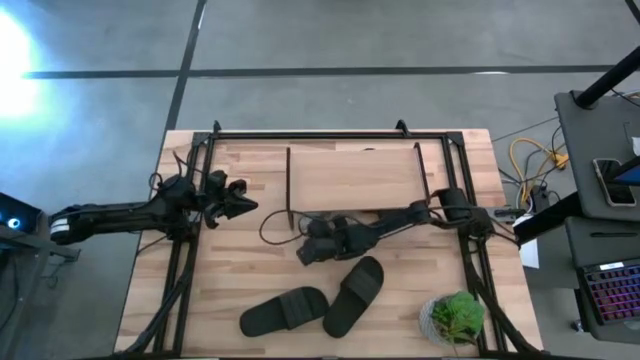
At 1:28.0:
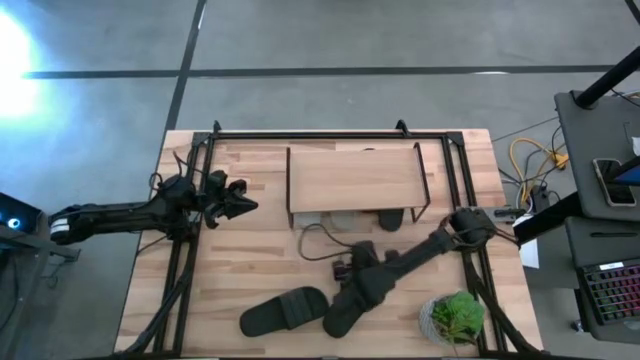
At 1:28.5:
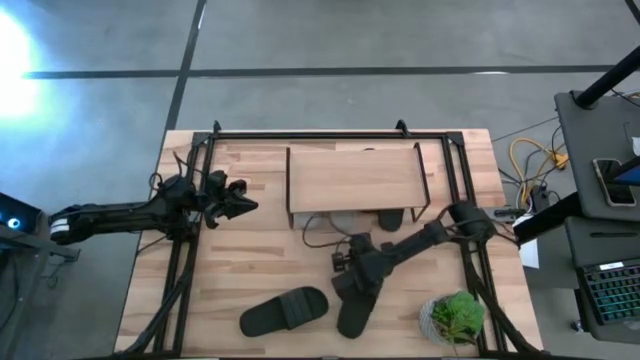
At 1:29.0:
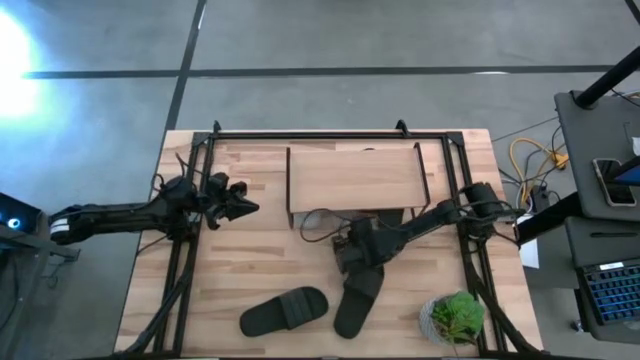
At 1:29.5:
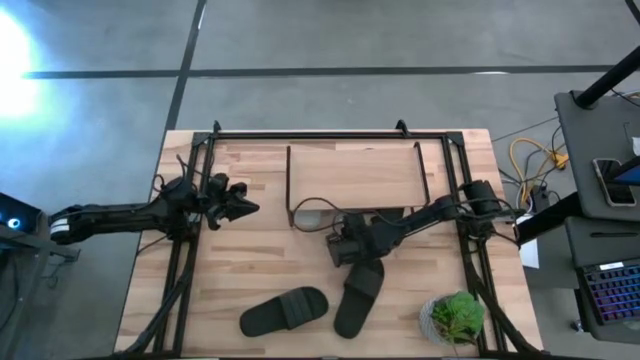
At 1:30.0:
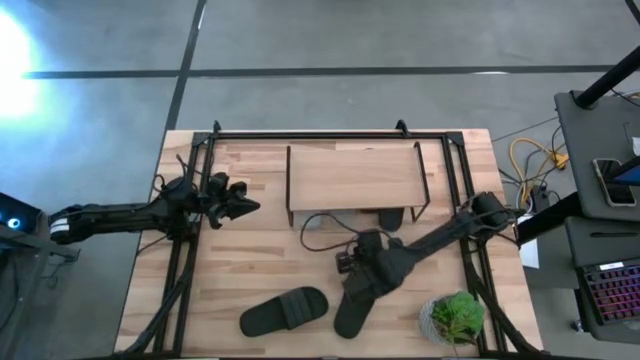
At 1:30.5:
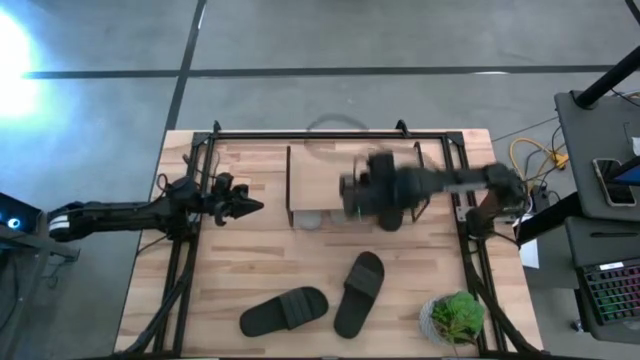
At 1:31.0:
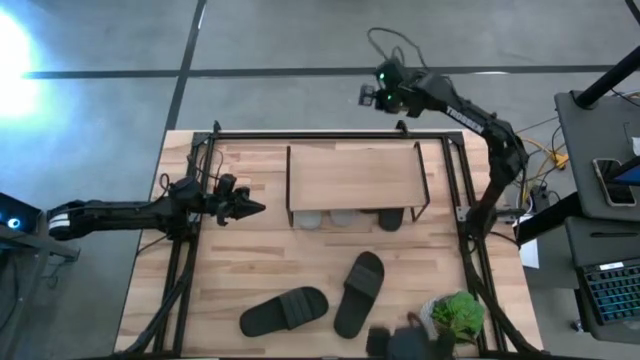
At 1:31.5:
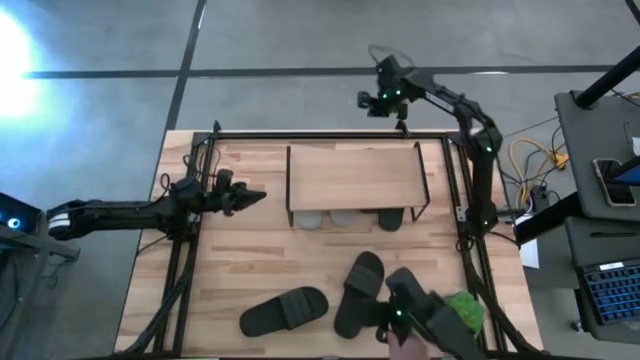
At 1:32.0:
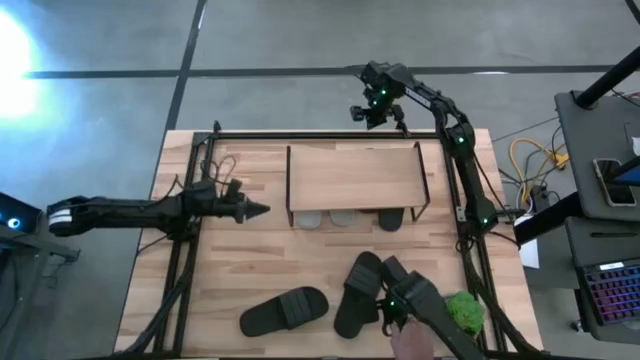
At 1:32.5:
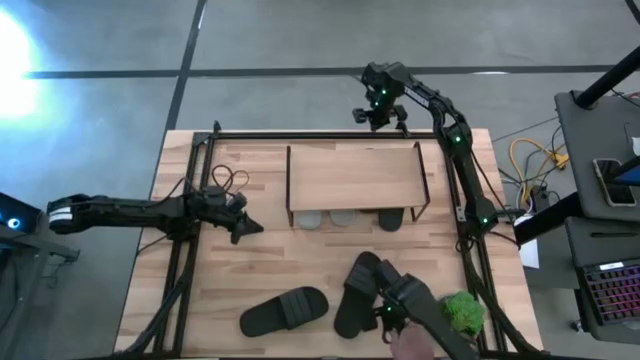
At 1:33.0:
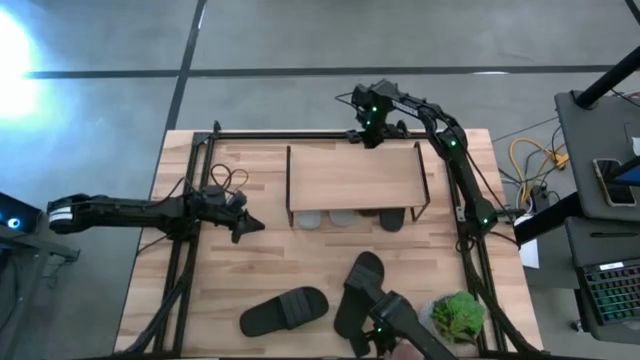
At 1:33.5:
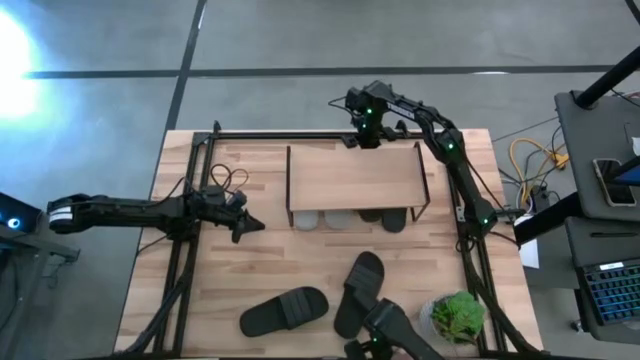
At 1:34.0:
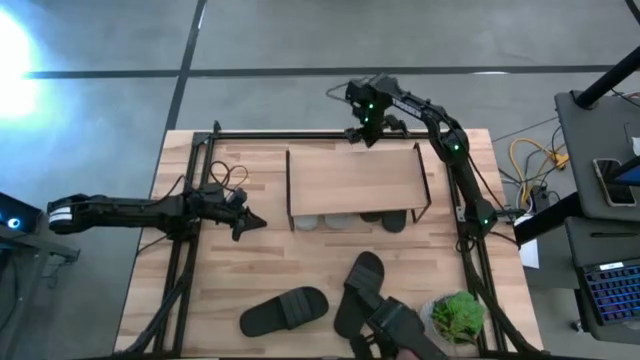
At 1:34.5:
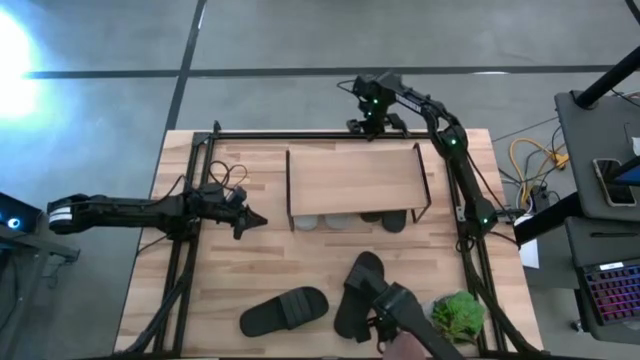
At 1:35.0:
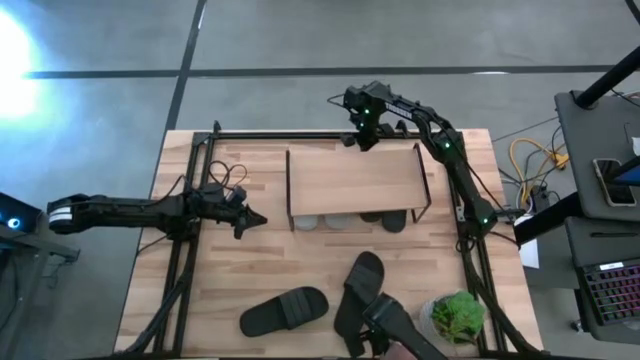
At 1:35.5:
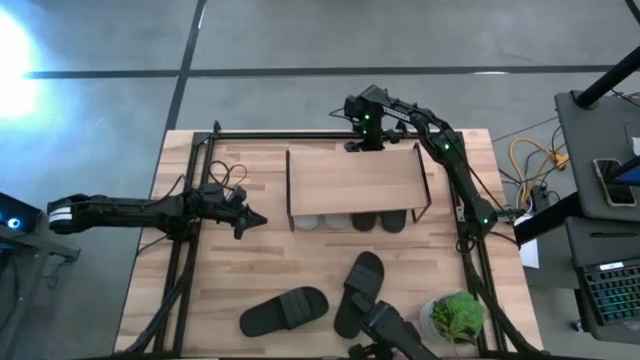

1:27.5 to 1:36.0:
Task: Pick and place slides into the shelf
Adjust the slippers under the shelf

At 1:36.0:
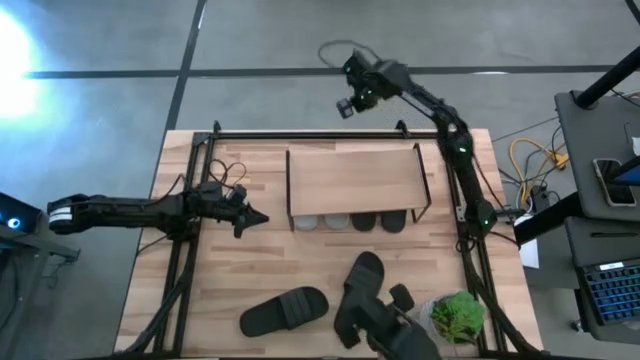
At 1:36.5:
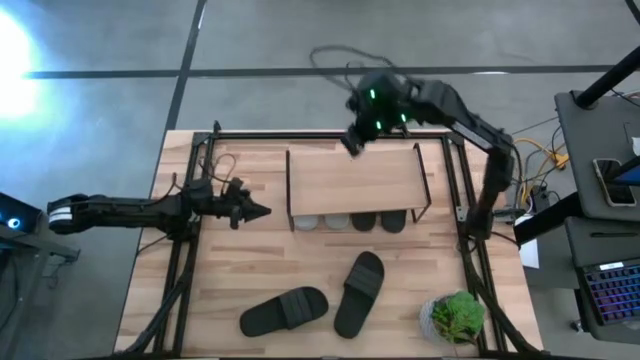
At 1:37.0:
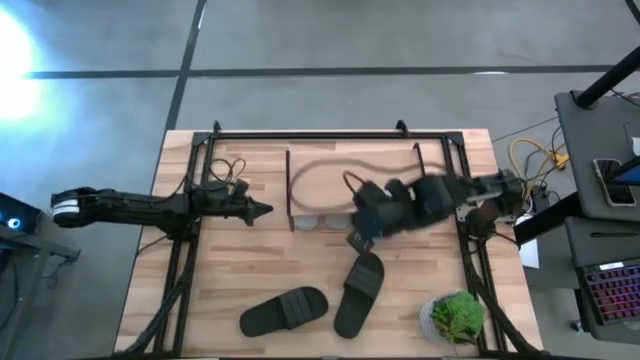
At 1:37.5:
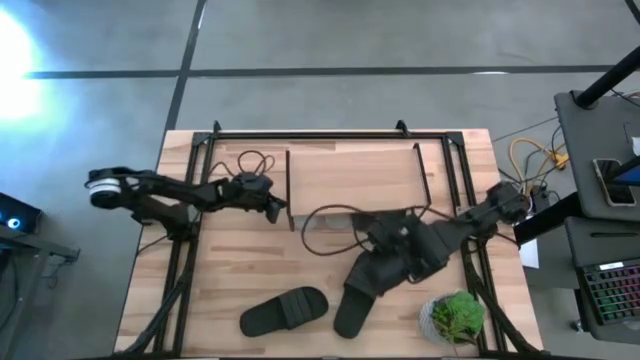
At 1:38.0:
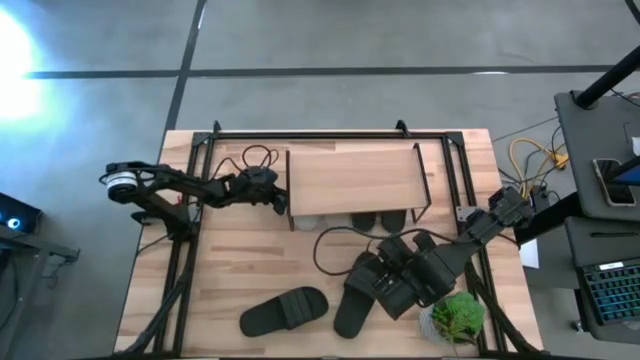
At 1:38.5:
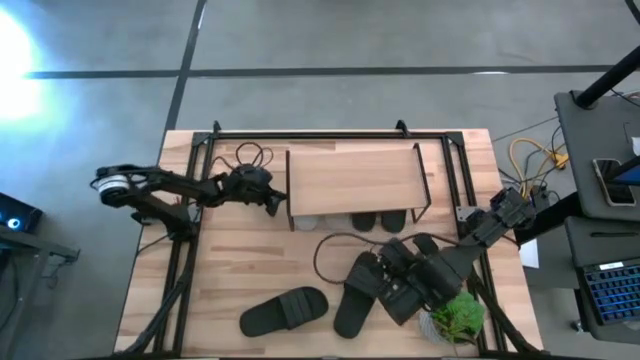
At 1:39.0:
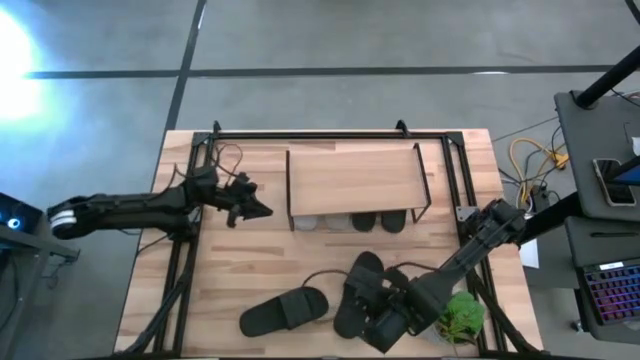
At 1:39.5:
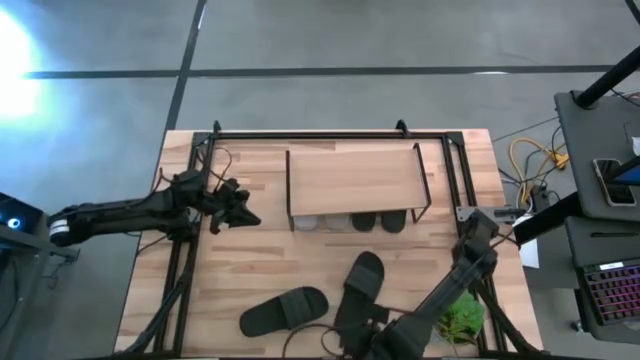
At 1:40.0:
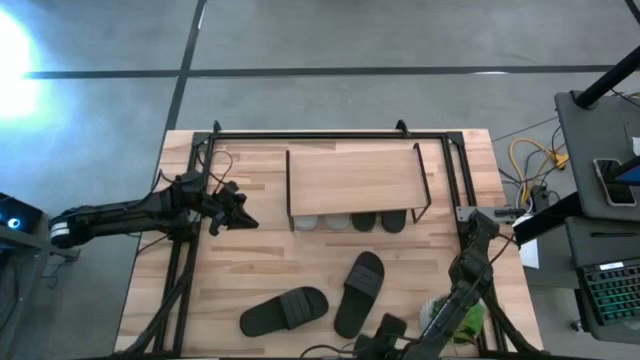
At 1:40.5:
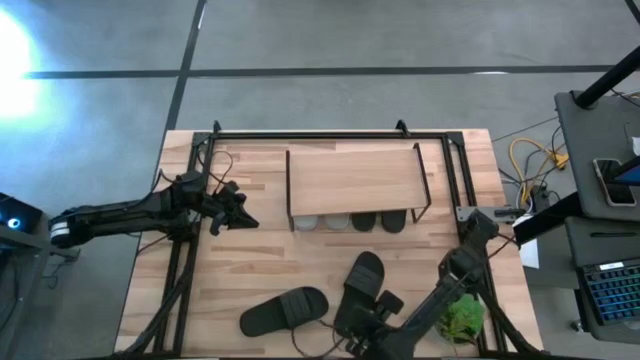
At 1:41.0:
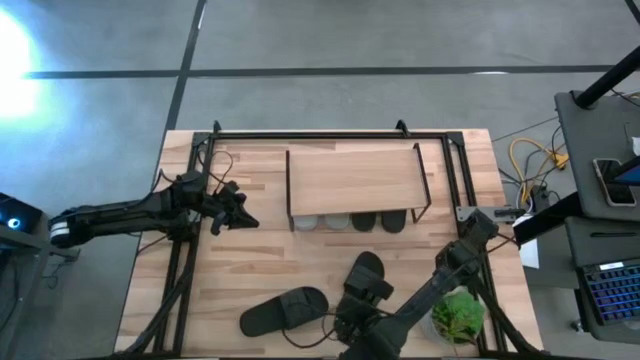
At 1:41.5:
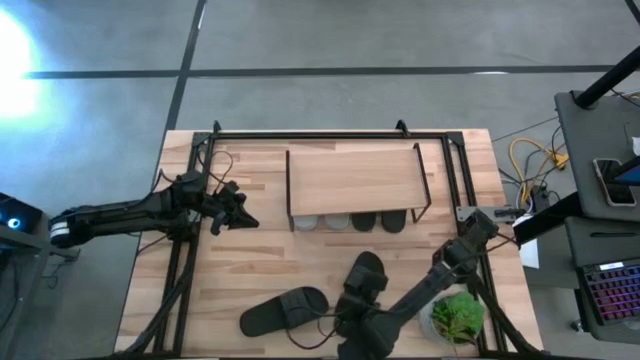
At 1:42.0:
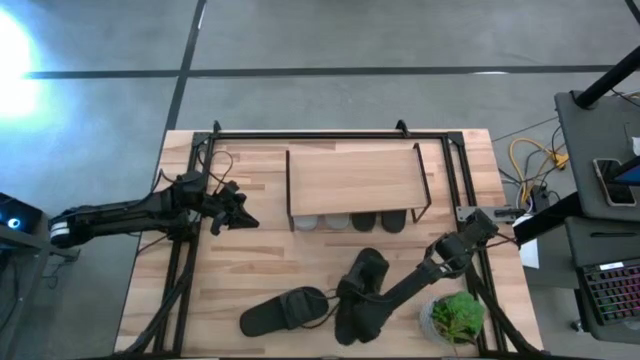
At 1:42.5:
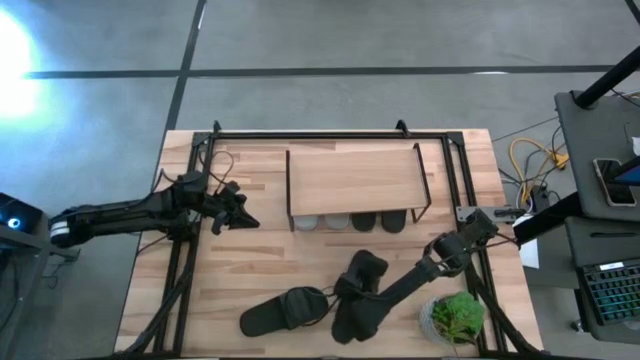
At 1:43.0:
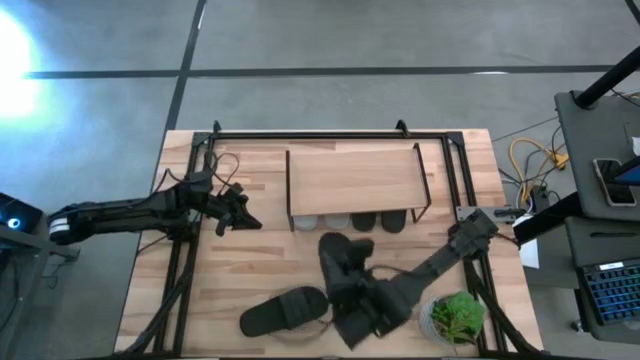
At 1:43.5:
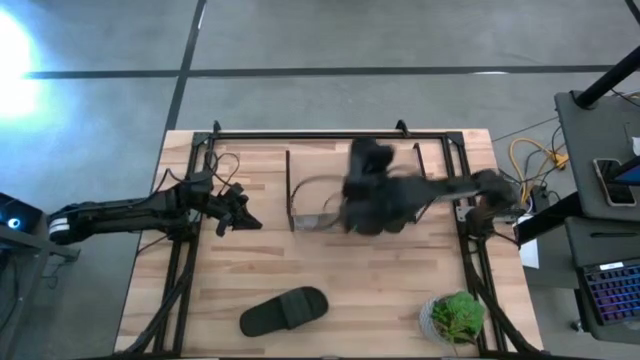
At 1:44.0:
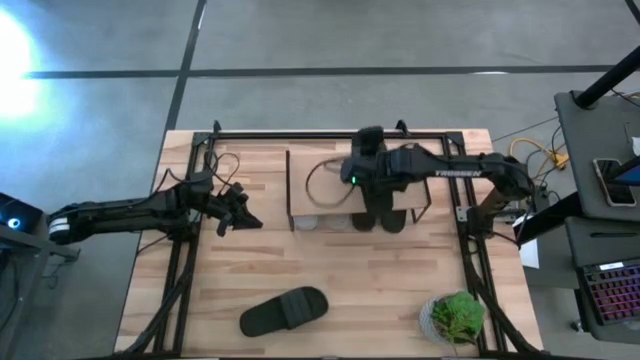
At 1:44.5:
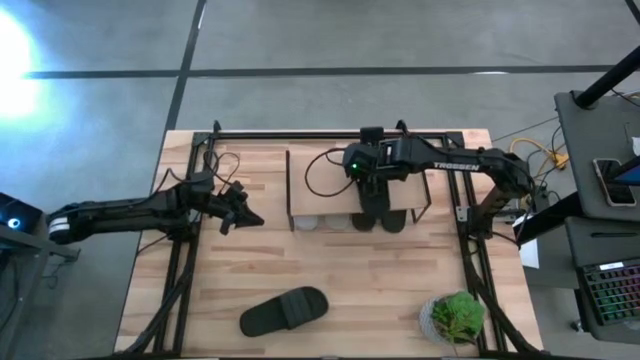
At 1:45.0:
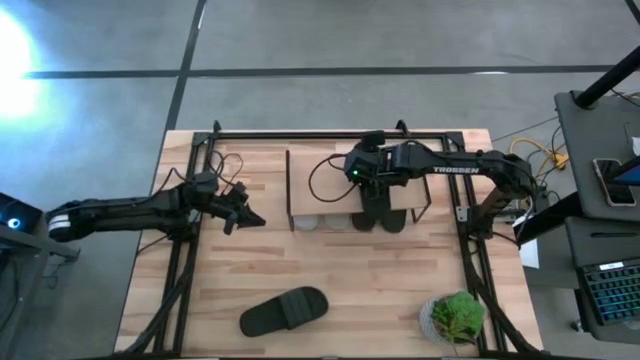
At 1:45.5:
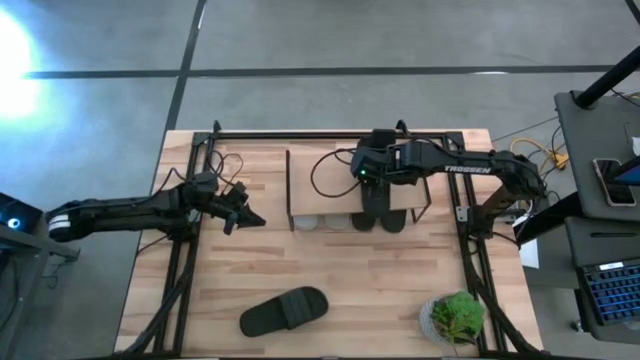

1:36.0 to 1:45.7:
Put the black slipper on the shelf

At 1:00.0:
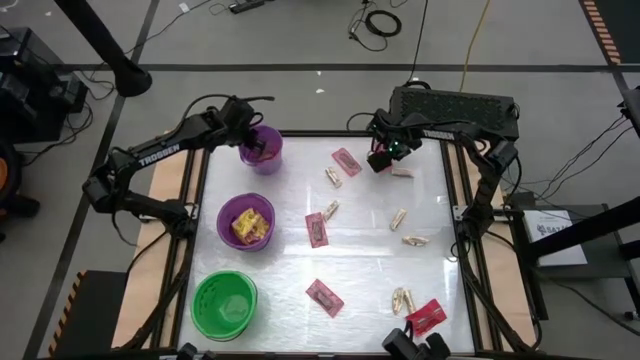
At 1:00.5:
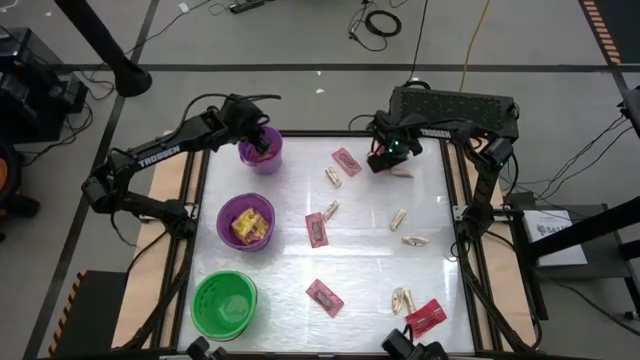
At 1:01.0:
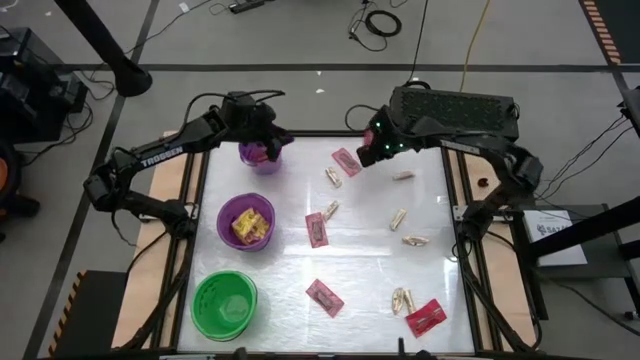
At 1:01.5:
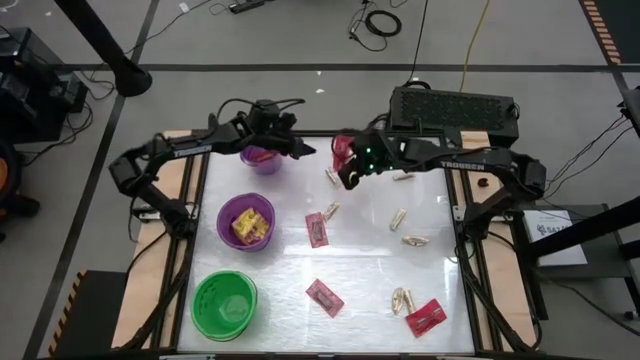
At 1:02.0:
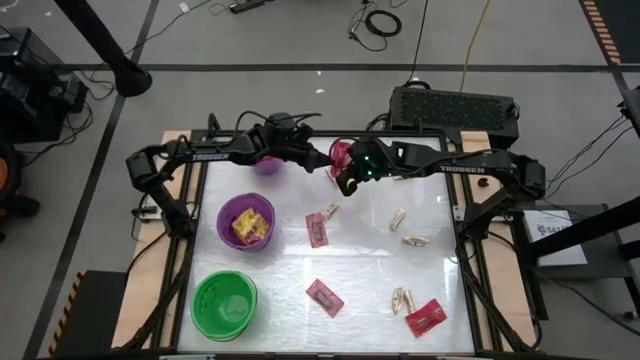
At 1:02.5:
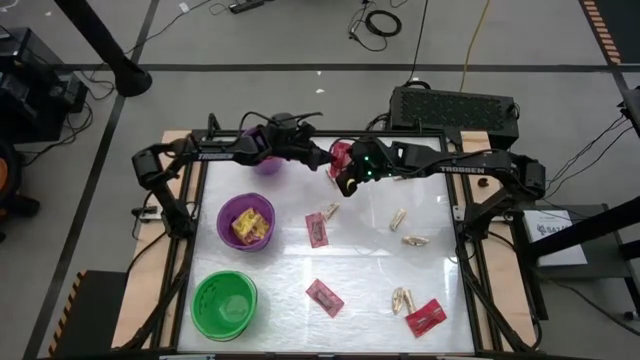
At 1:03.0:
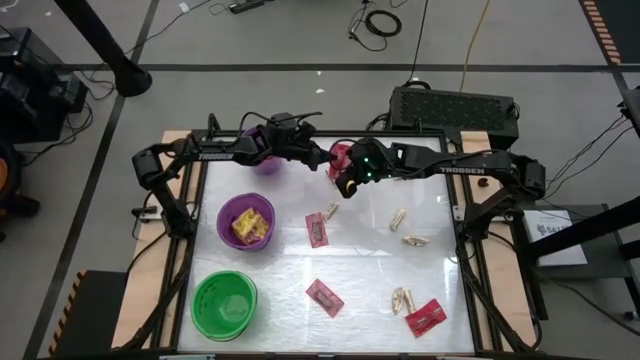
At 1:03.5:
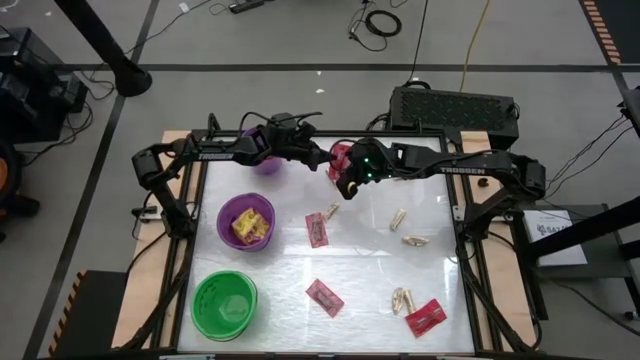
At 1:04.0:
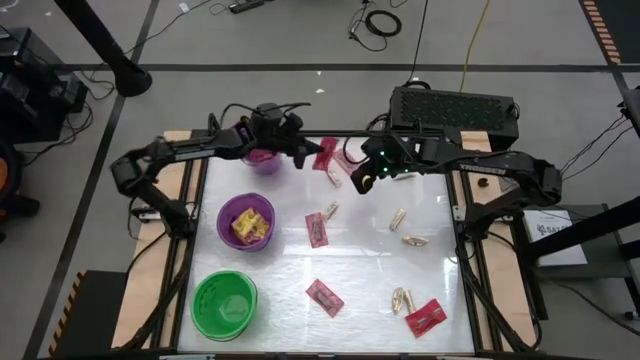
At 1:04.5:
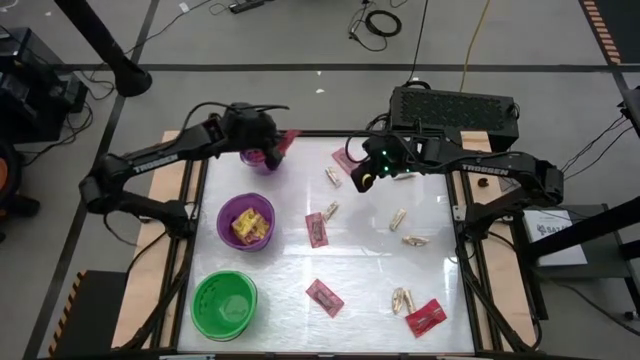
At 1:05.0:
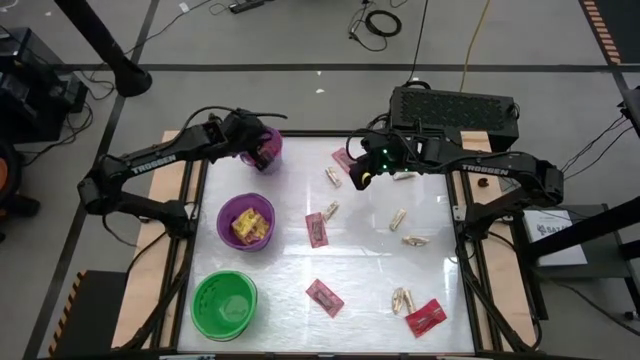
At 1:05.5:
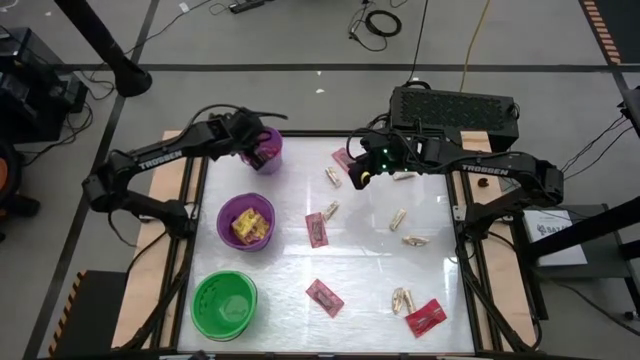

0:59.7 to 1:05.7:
Task: Sort candy by brand, put in halloween buckets
Put the red candy into the top purple bucket
